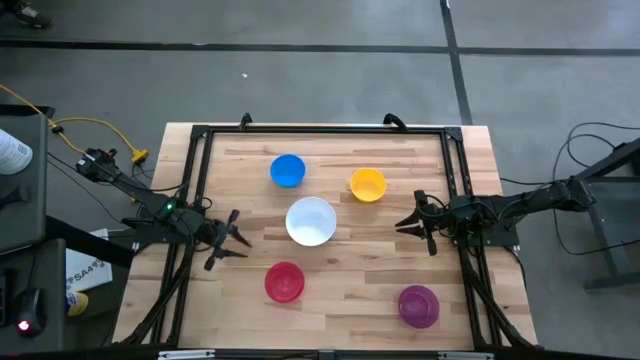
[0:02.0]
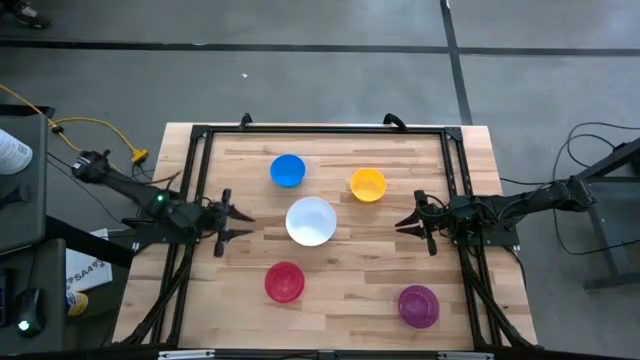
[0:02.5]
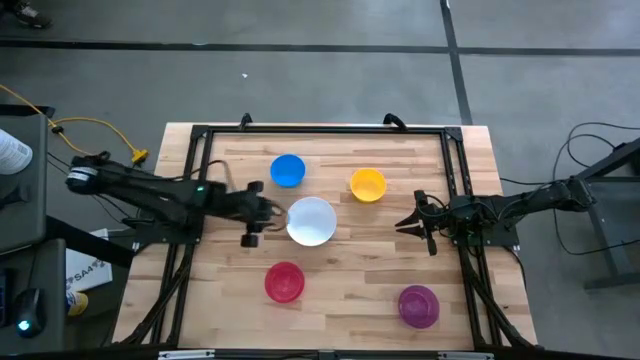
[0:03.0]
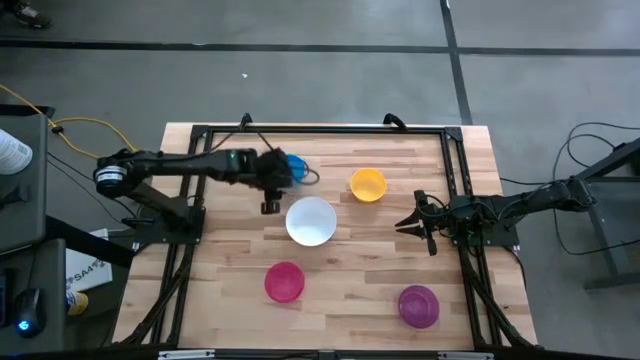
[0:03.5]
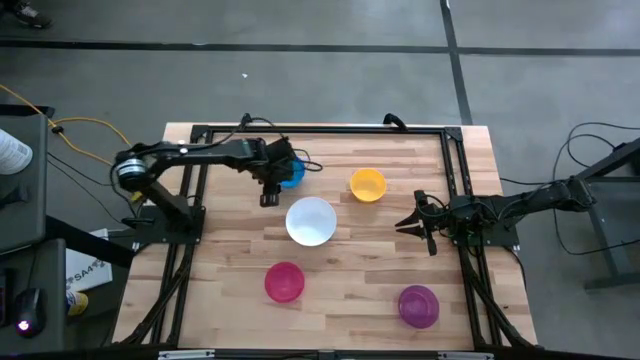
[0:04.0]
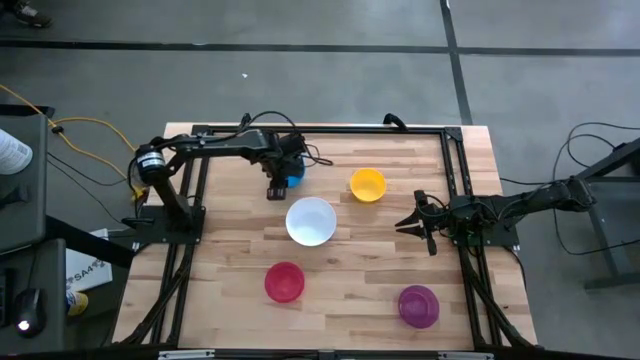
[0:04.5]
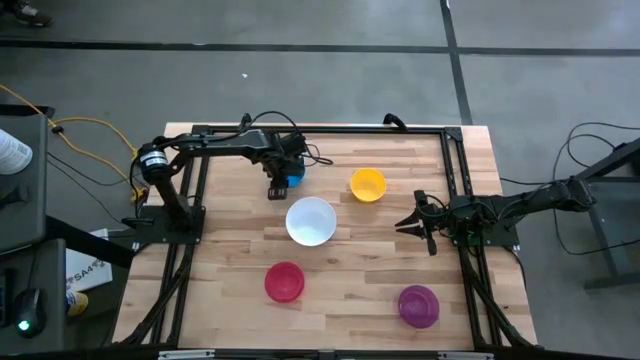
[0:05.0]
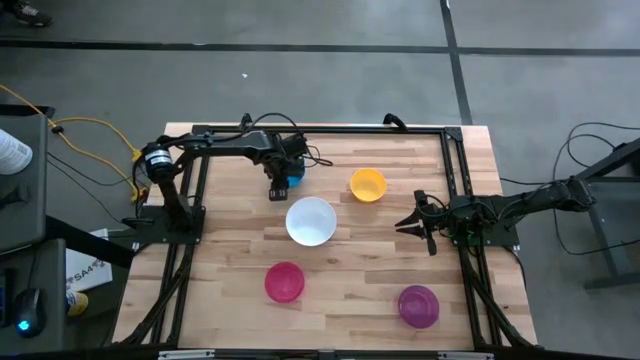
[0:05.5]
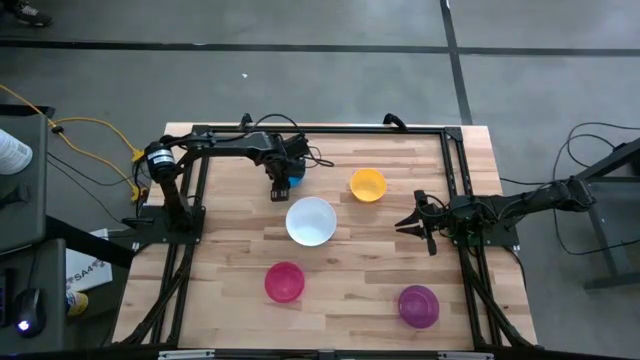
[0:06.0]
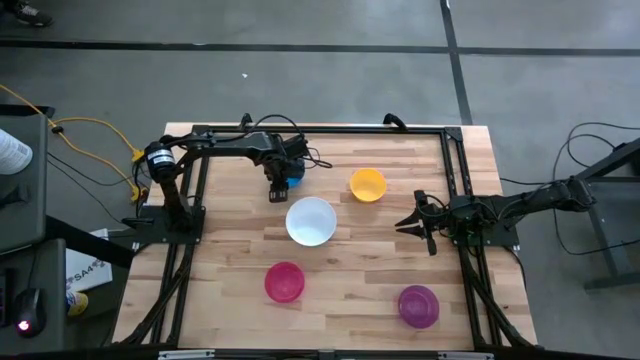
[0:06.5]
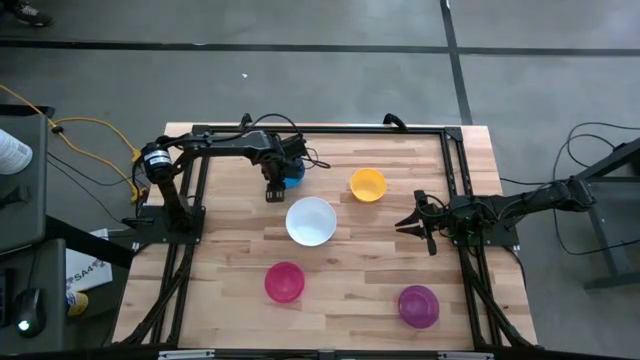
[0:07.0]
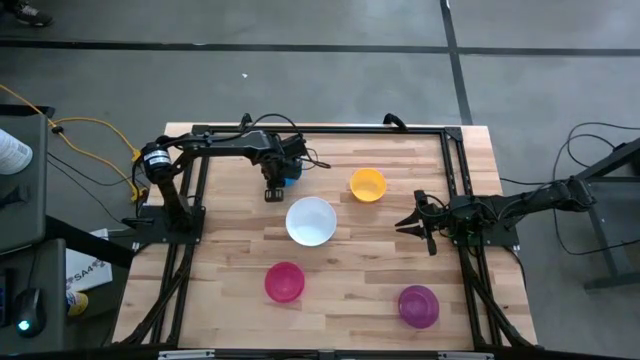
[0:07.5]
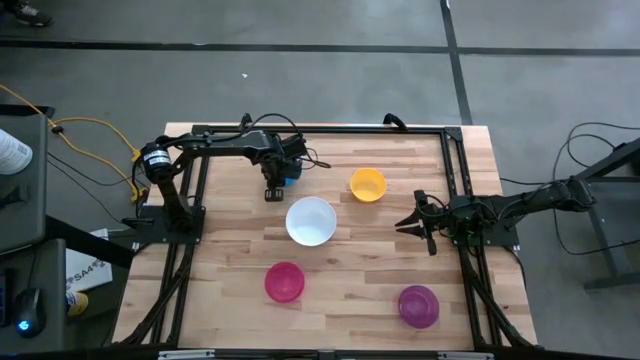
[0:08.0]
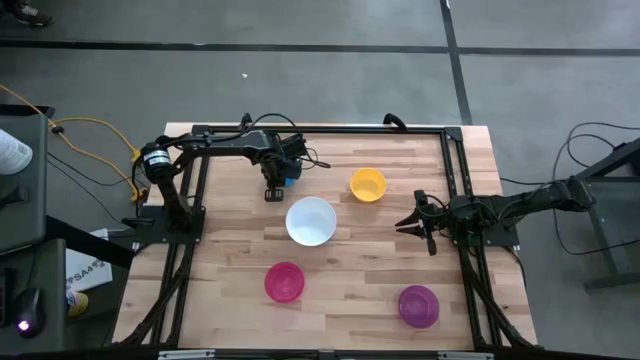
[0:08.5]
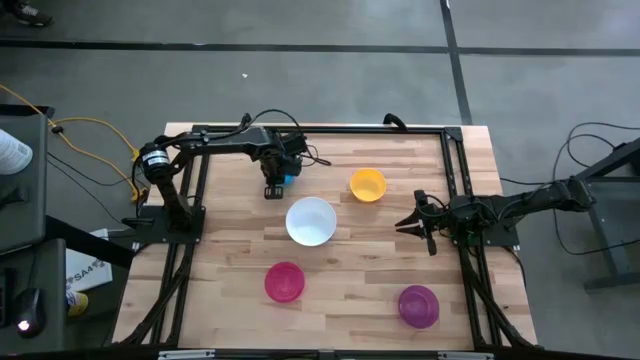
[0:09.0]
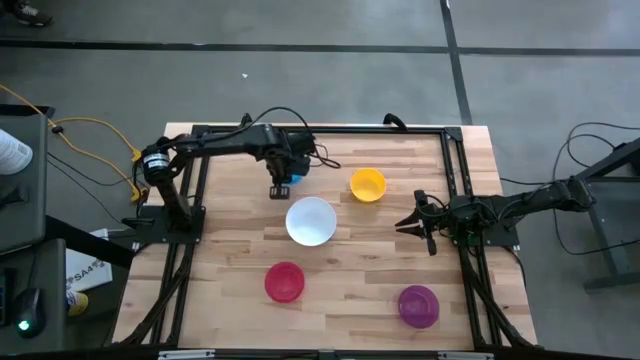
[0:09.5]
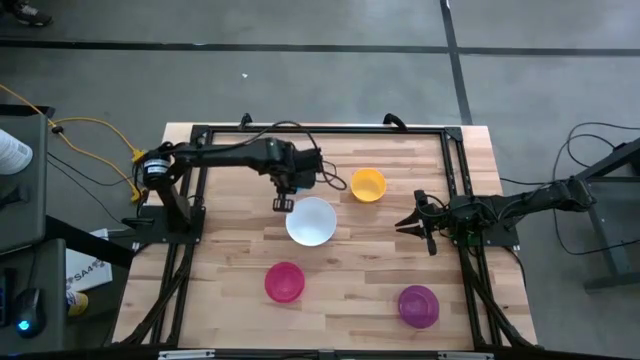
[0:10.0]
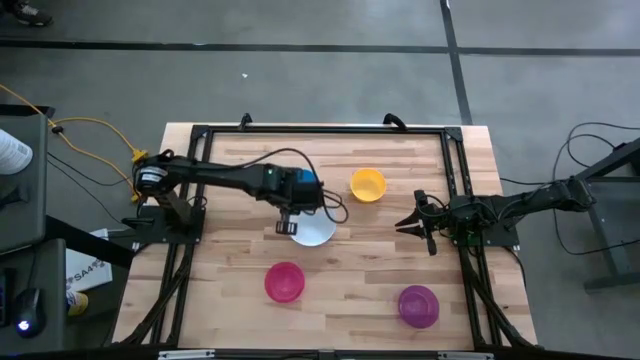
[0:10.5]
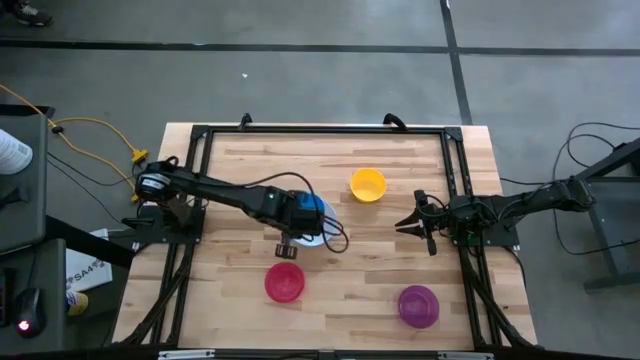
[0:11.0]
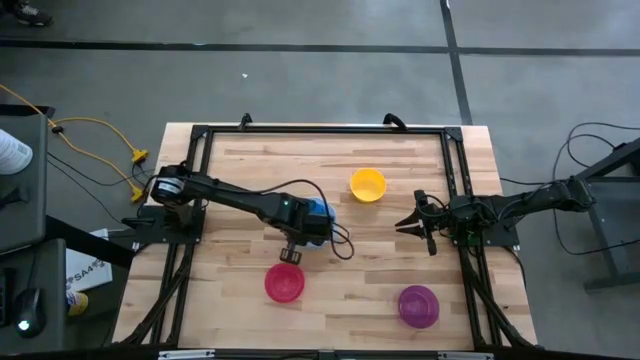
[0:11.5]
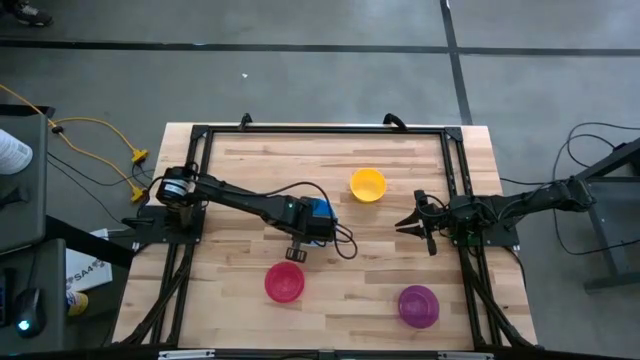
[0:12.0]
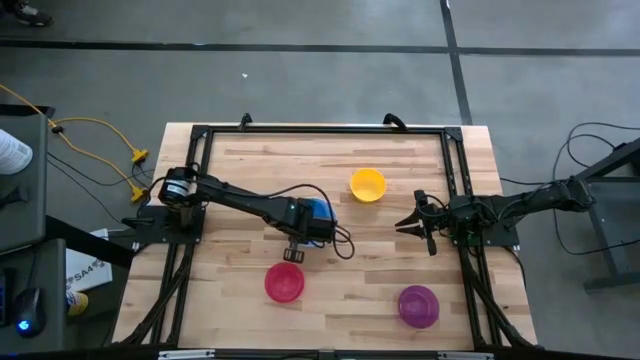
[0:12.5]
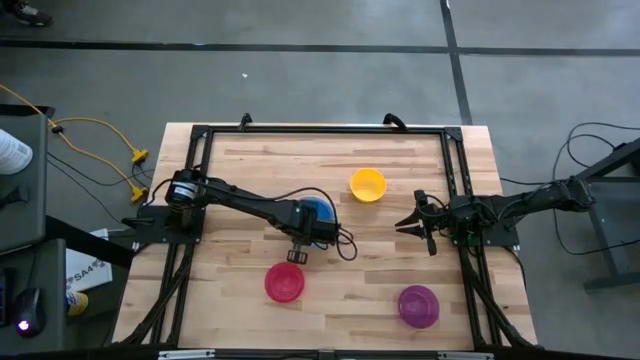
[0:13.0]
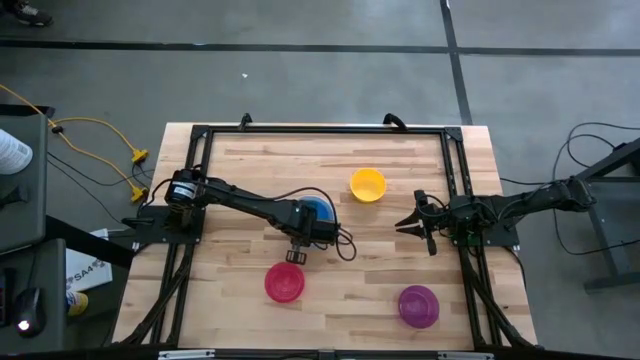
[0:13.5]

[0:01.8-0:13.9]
Stack the blue bowl on top of the white bowl

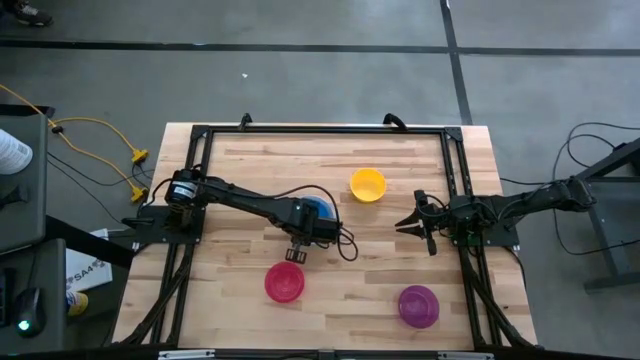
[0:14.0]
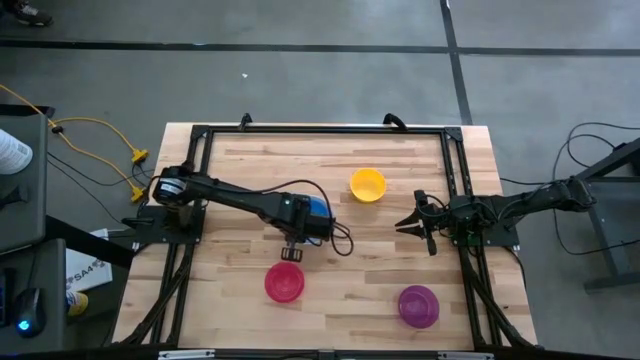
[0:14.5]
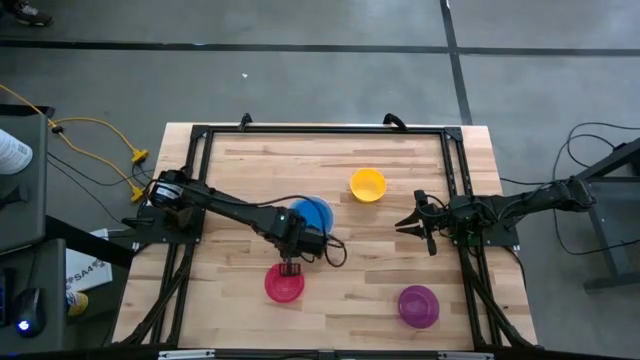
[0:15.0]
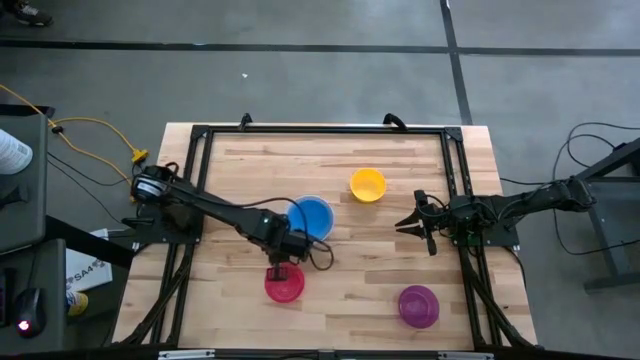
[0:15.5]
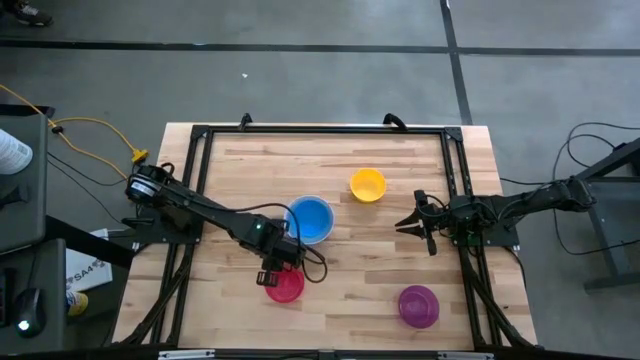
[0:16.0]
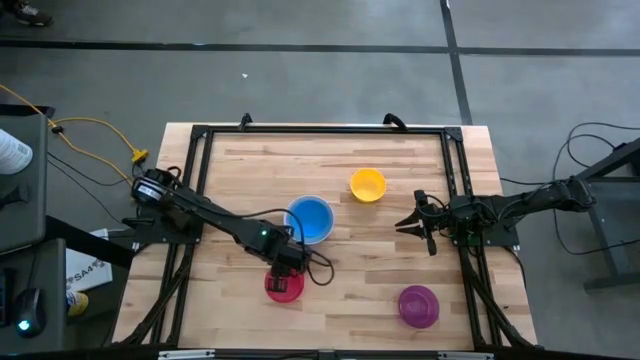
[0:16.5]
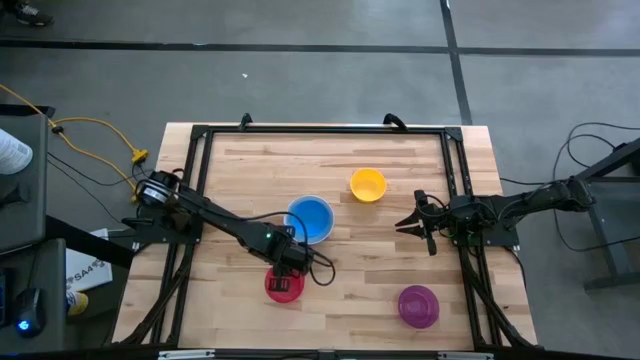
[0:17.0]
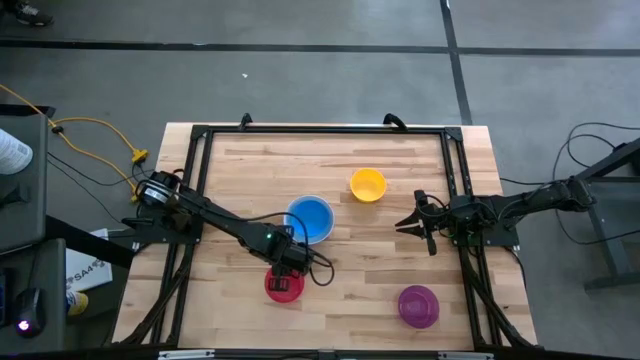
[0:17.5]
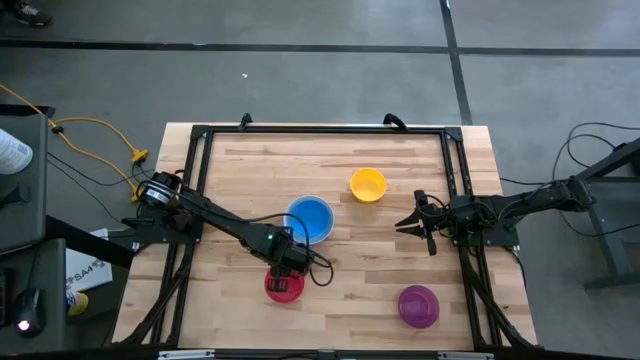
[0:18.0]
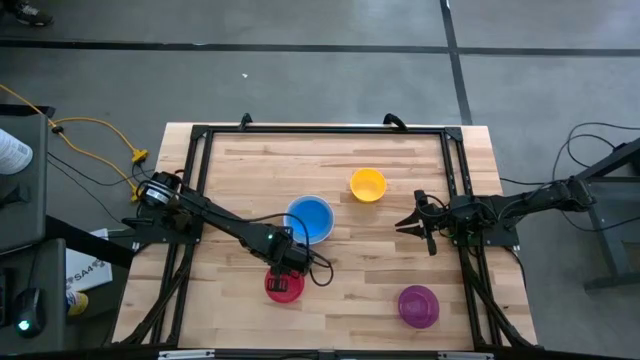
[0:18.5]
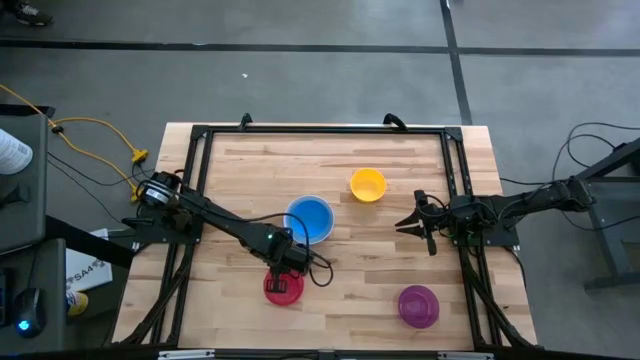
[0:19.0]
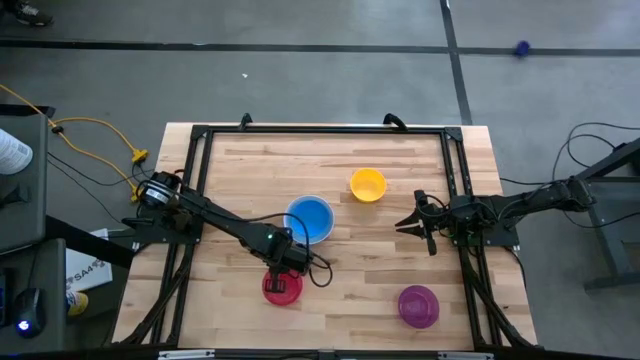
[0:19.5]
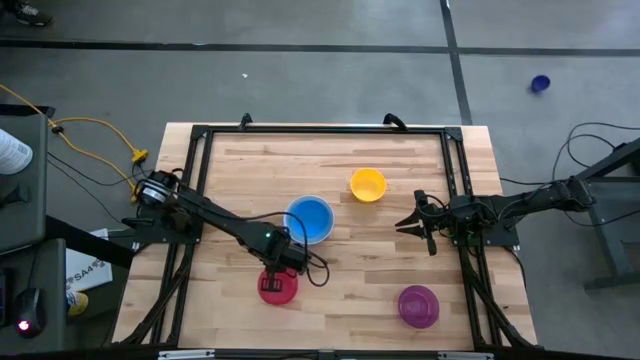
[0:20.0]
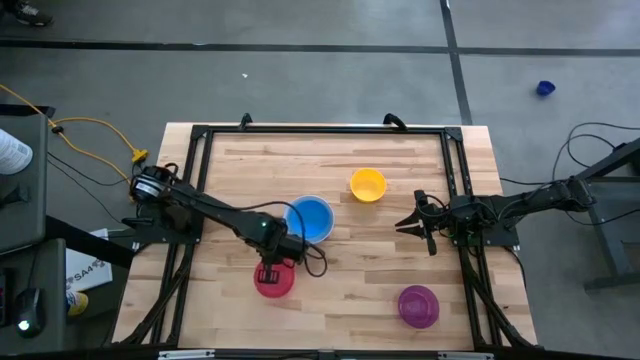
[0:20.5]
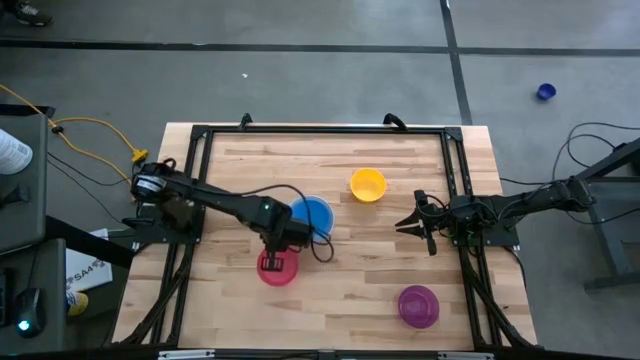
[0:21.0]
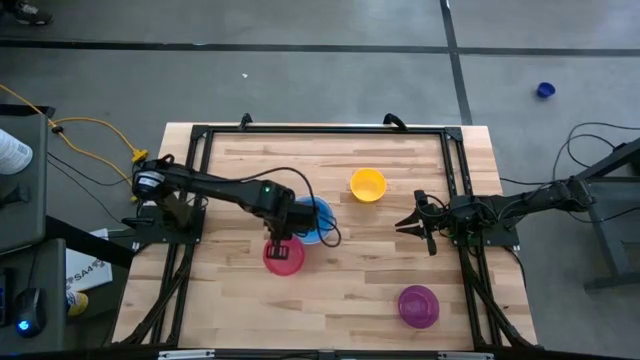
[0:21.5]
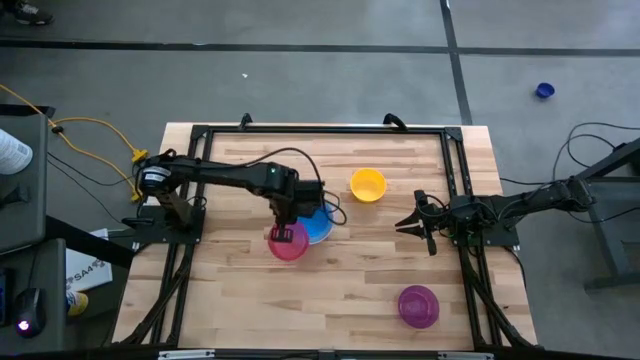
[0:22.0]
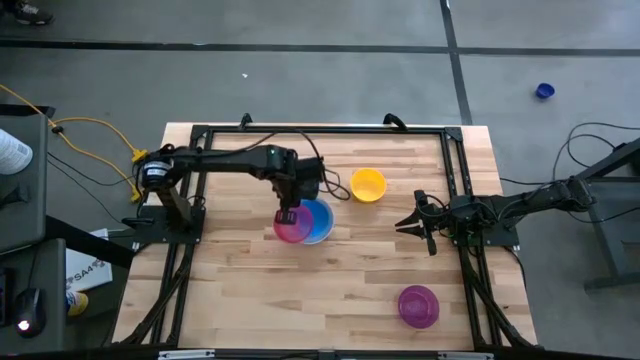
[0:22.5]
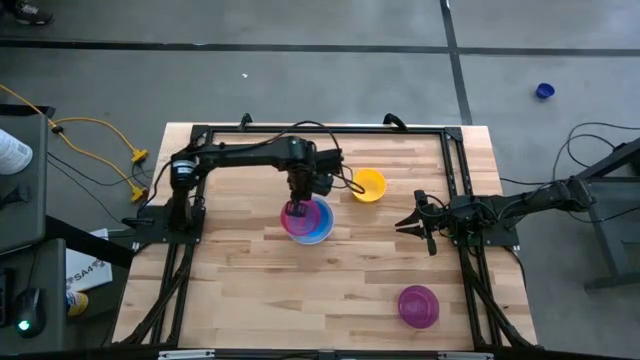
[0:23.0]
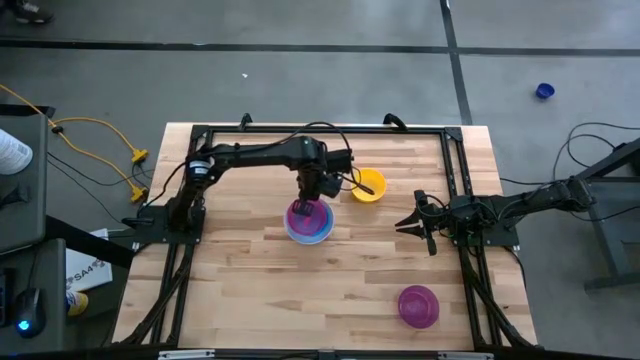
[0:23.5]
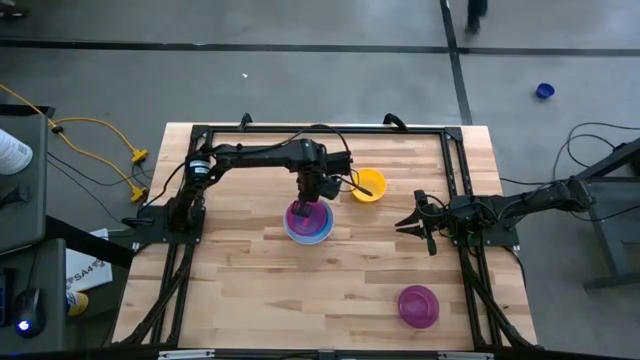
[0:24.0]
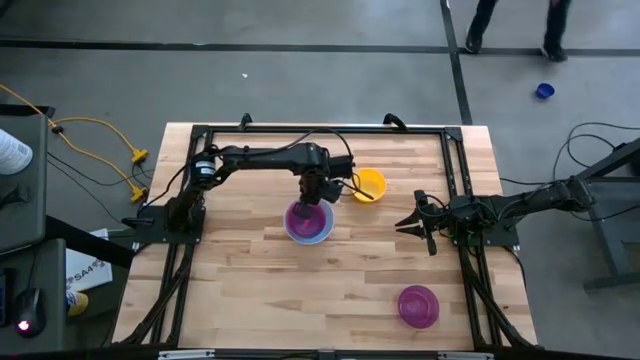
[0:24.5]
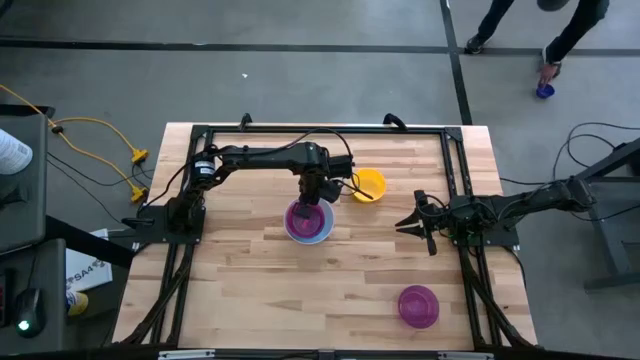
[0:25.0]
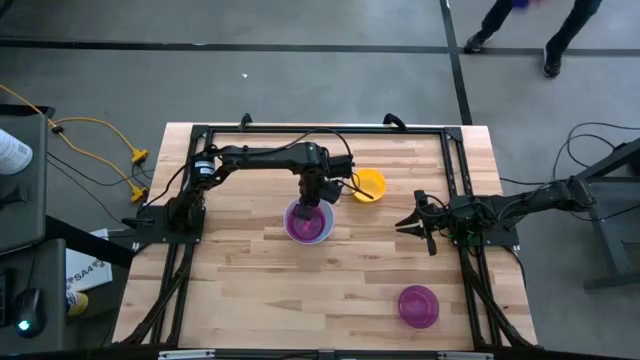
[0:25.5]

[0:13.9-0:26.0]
Stack the pink bowl on top of the blue bowl
